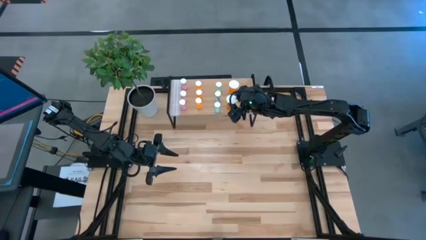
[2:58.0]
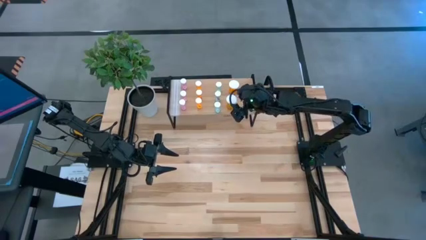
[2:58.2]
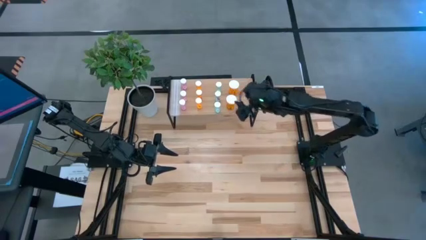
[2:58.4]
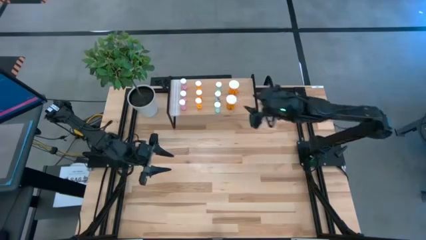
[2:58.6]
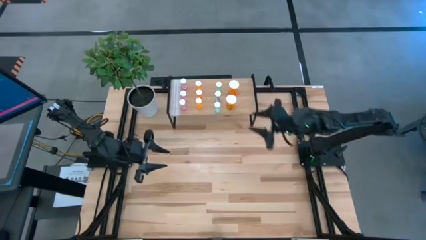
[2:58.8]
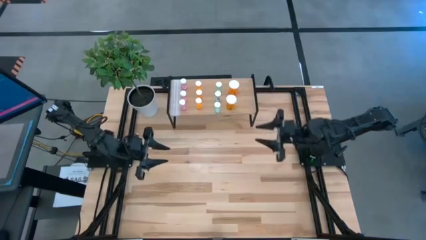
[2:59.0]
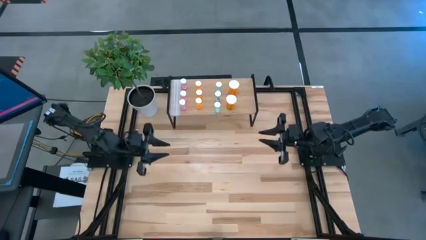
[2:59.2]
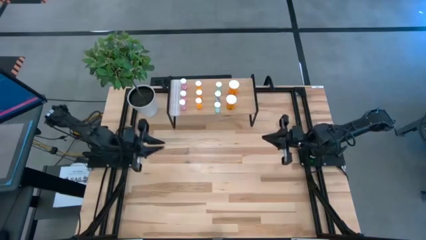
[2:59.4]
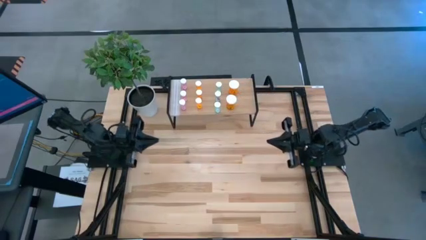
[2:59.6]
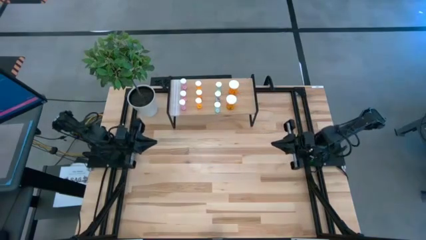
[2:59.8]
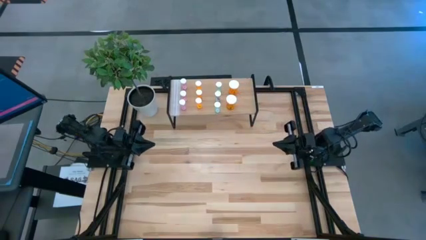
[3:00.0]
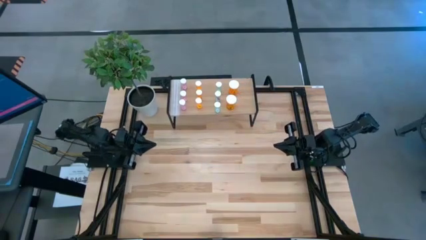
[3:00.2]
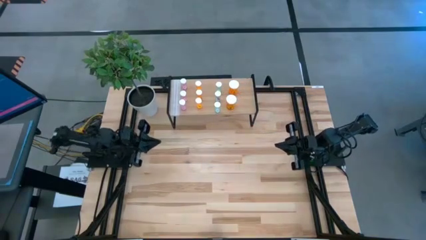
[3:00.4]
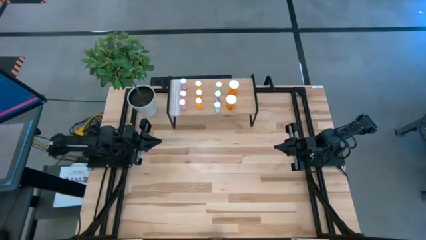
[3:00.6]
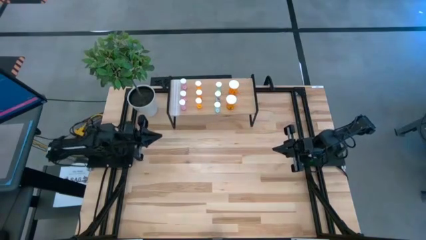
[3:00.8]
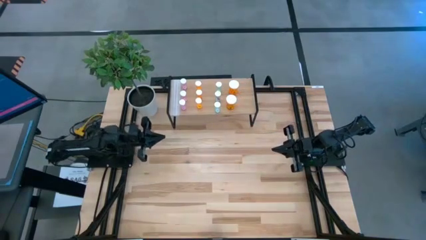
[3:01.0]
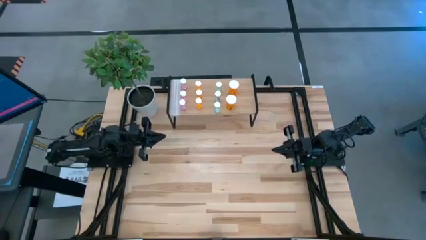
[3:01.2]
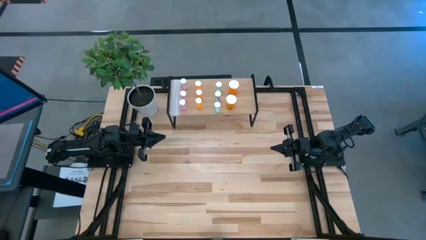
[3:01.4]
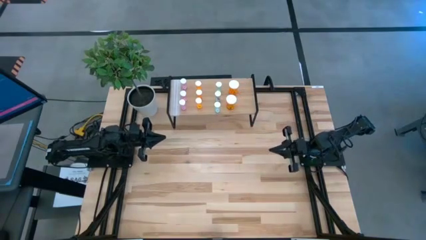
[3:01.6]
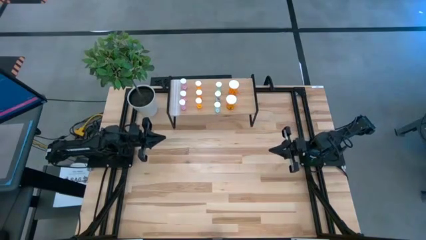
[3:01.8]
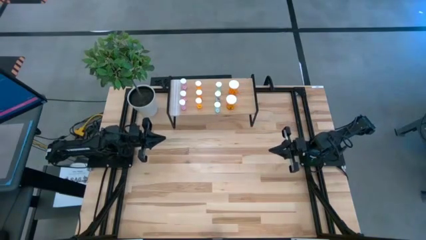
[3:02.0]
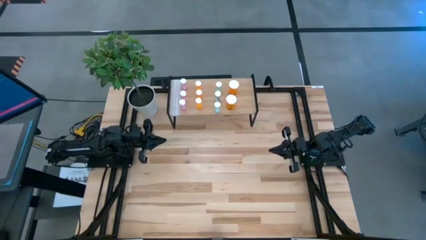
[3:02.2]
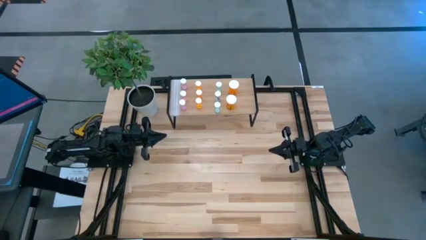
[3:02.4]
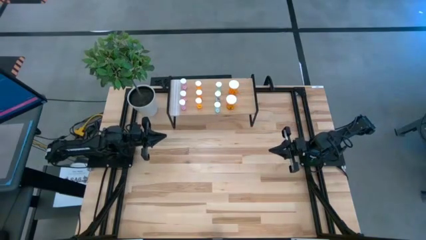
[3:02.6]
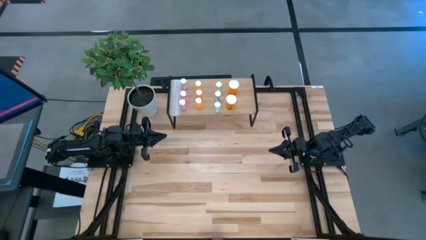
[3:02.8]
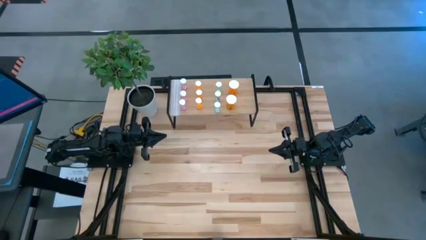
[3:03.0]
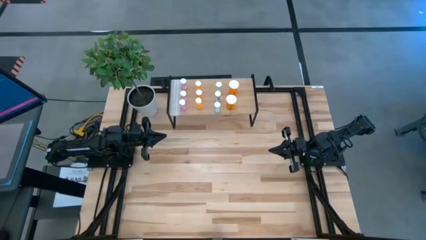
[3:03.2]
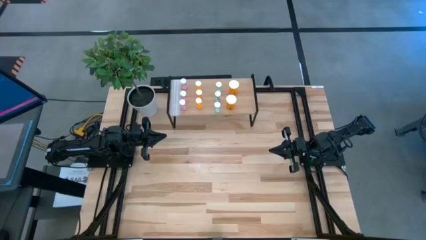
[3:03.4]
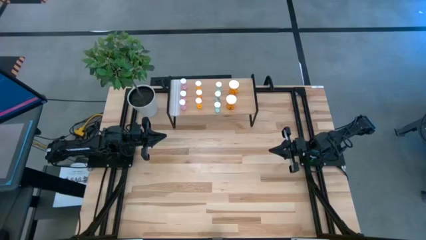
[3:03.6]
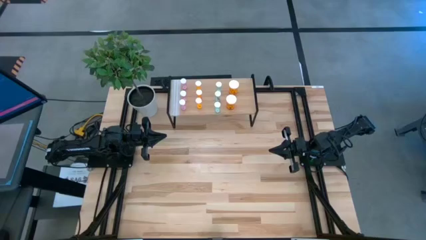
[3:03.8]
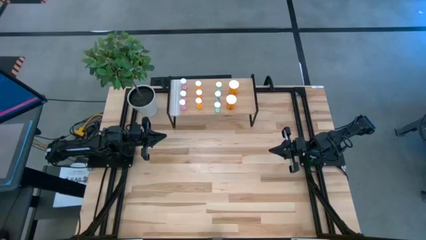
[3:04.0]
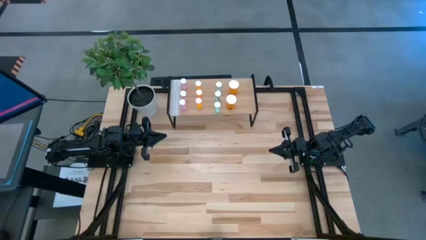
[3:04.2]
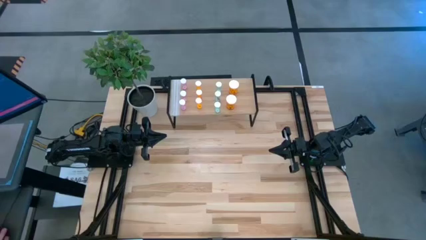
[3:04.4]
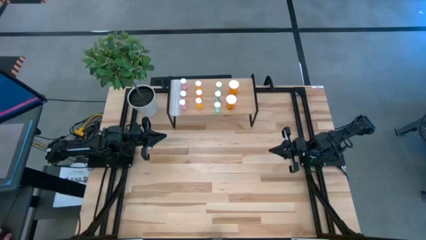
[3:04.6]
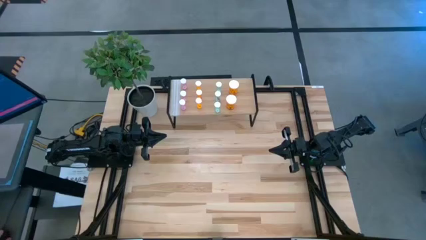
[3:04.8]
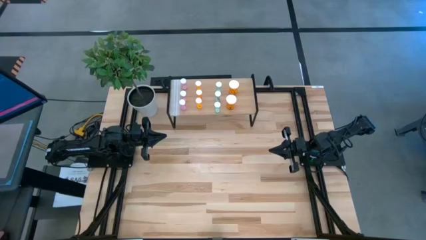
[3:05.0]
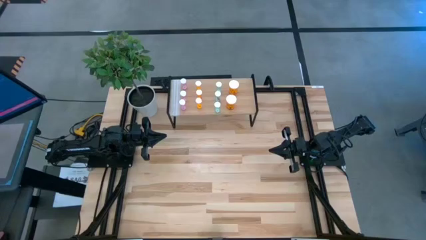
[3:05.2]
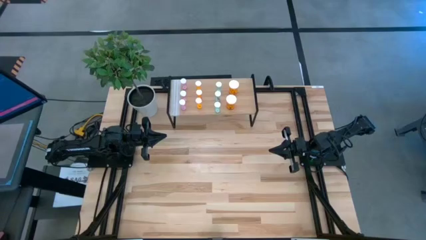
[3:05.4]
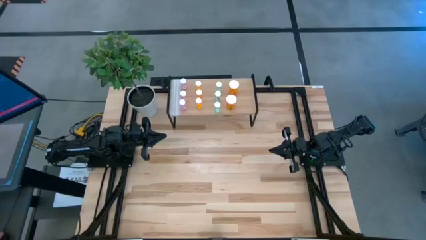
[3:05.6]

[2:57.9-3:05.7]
Task: Pick and place medicine bottles onto shelf by color
Return to Home Position

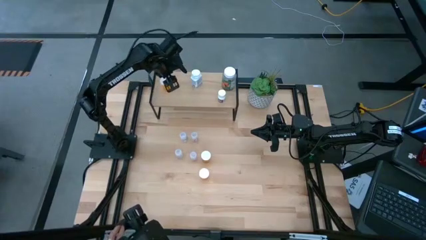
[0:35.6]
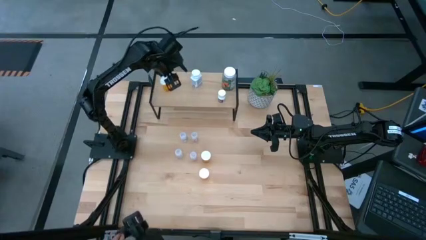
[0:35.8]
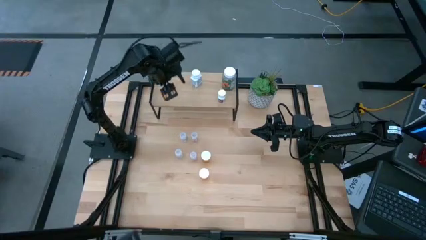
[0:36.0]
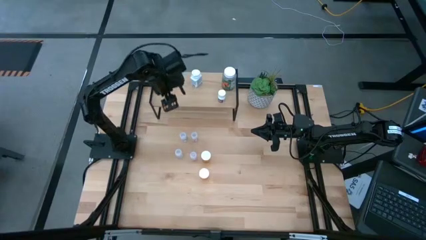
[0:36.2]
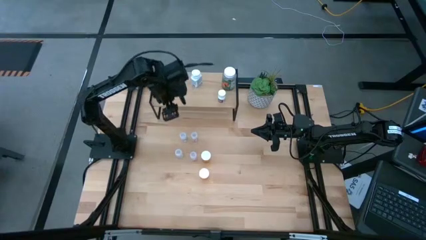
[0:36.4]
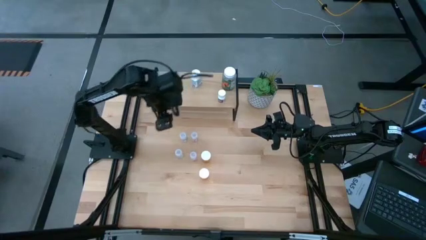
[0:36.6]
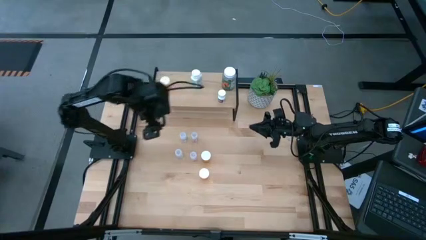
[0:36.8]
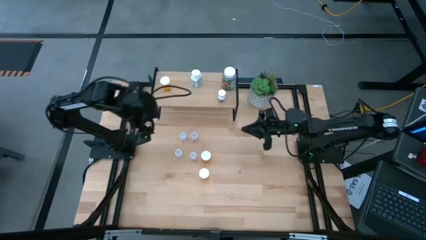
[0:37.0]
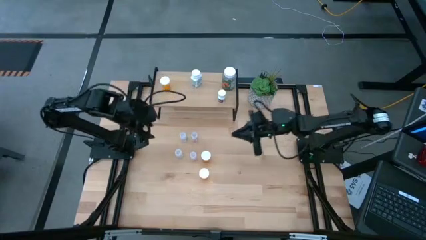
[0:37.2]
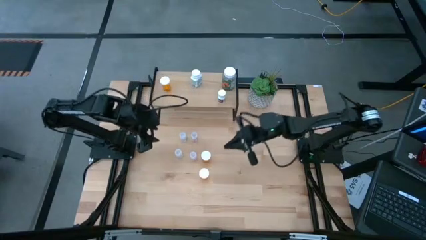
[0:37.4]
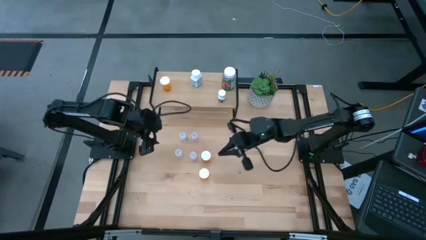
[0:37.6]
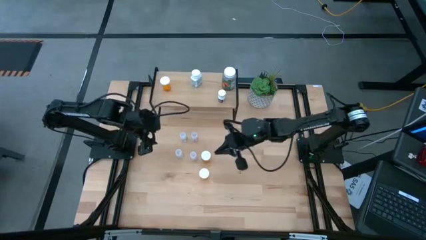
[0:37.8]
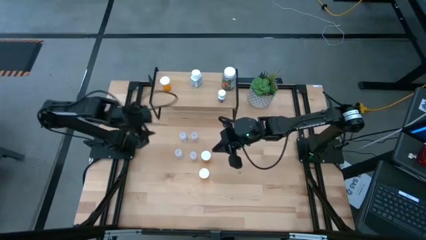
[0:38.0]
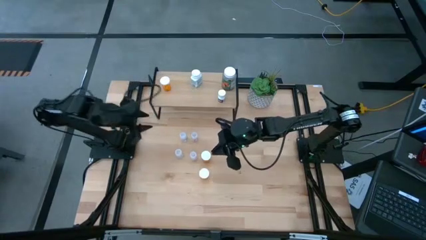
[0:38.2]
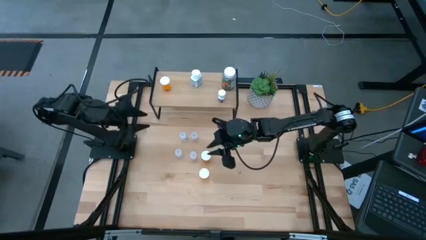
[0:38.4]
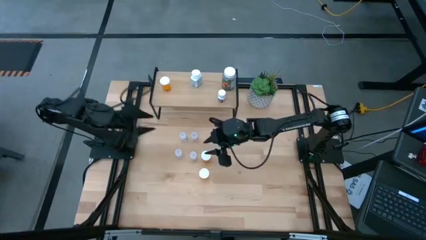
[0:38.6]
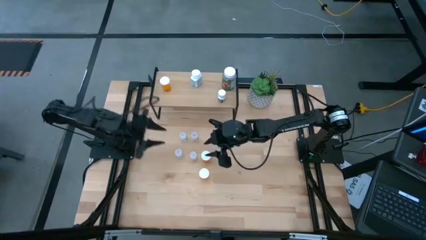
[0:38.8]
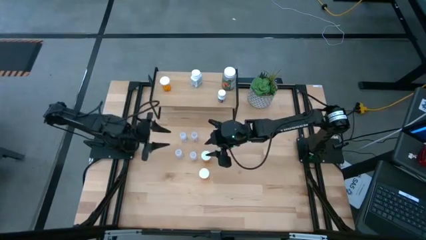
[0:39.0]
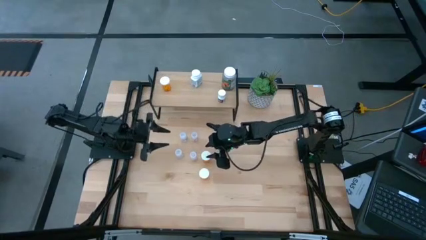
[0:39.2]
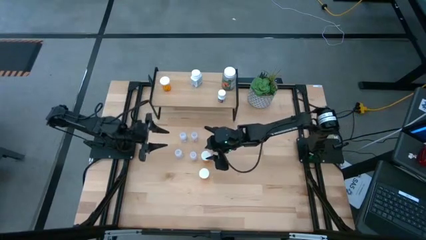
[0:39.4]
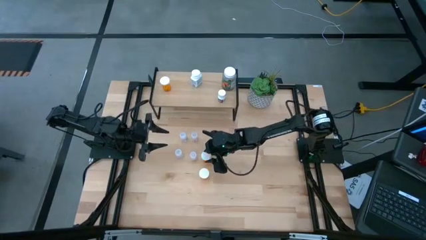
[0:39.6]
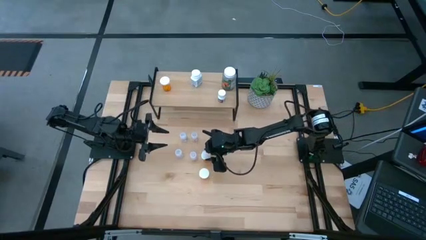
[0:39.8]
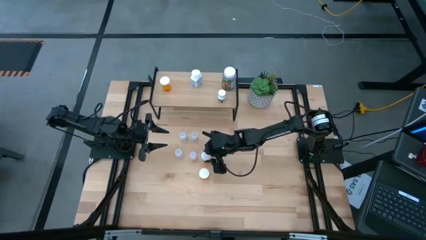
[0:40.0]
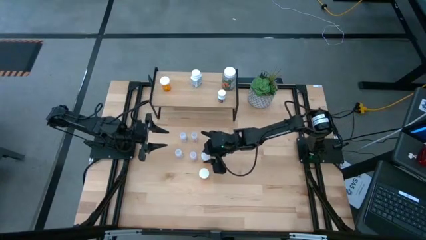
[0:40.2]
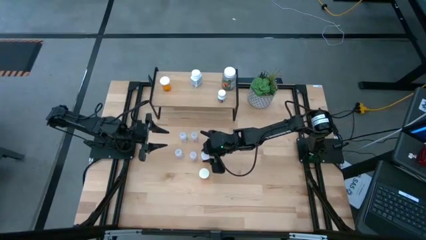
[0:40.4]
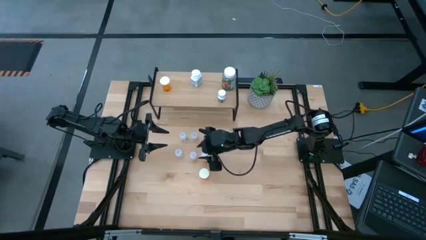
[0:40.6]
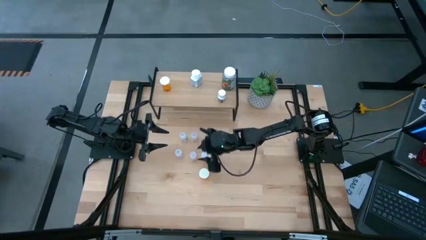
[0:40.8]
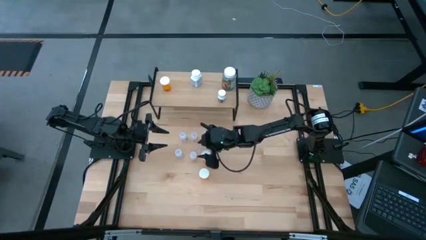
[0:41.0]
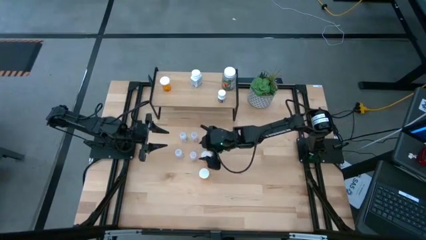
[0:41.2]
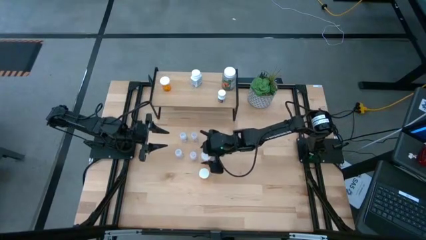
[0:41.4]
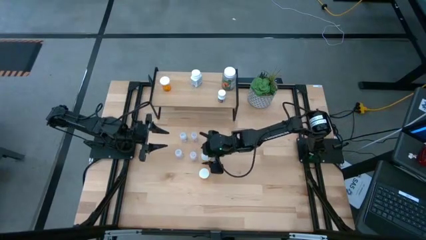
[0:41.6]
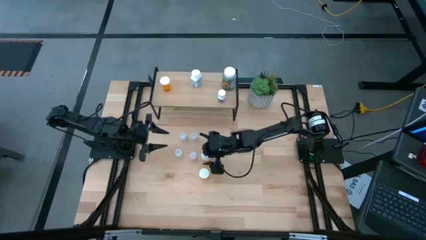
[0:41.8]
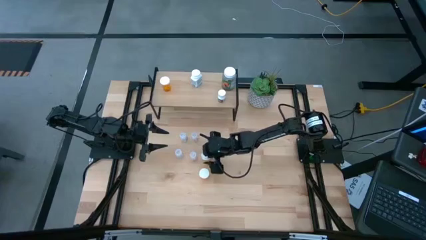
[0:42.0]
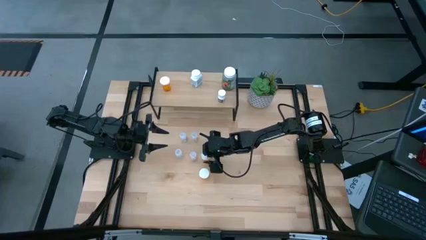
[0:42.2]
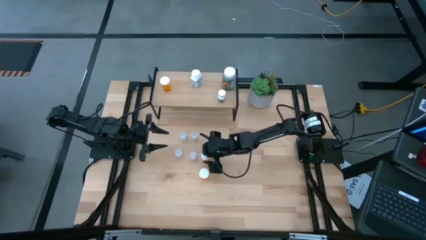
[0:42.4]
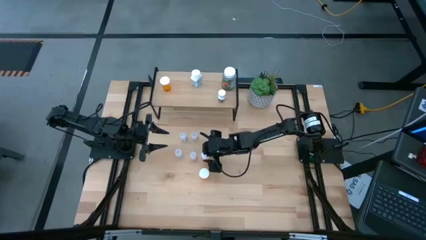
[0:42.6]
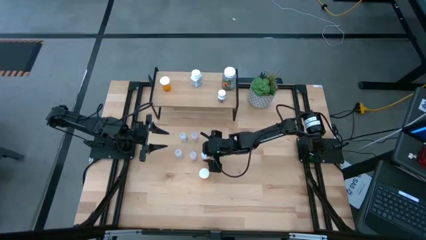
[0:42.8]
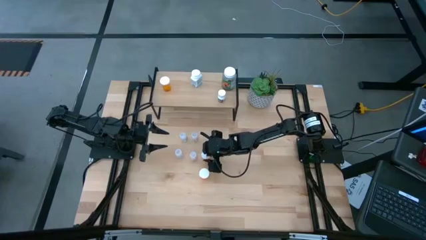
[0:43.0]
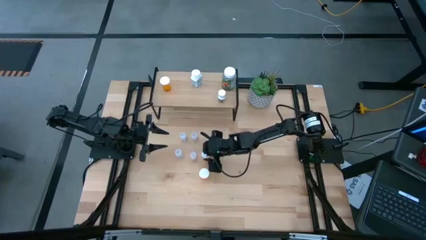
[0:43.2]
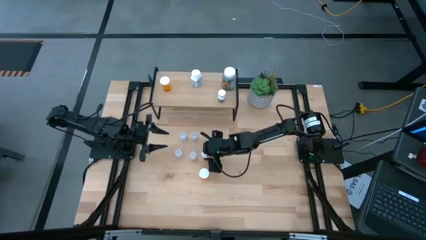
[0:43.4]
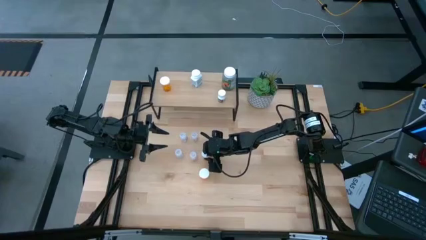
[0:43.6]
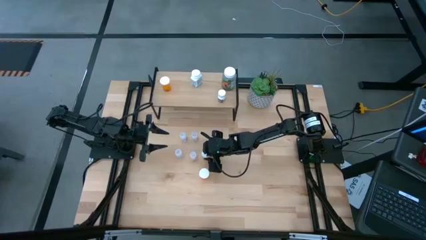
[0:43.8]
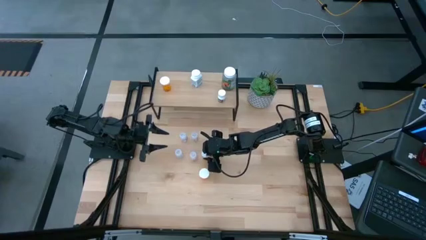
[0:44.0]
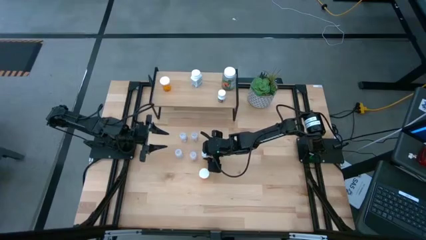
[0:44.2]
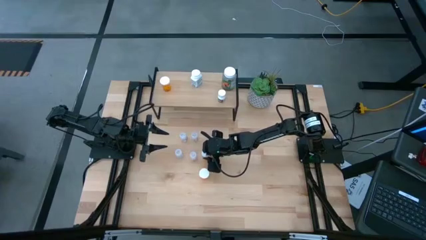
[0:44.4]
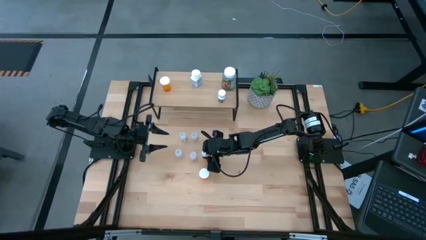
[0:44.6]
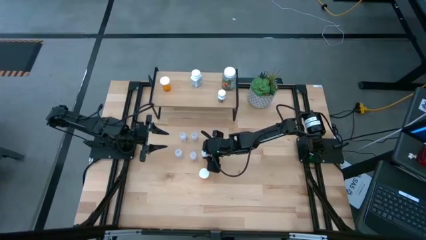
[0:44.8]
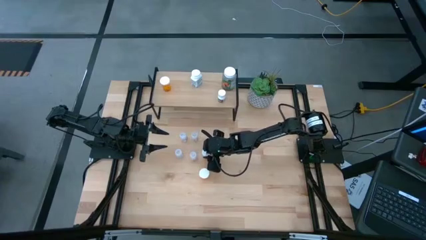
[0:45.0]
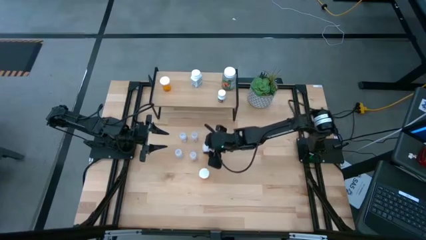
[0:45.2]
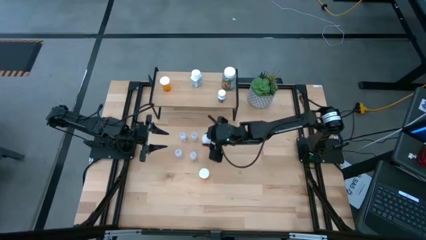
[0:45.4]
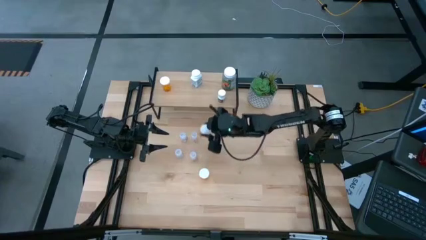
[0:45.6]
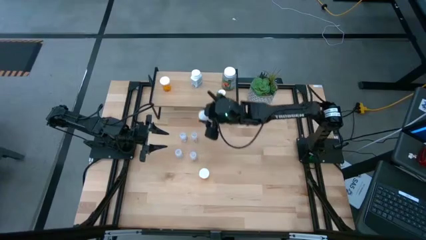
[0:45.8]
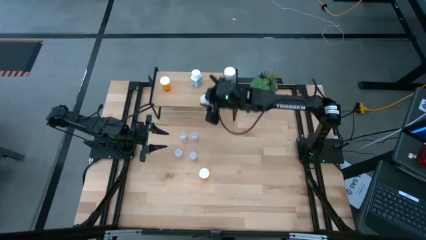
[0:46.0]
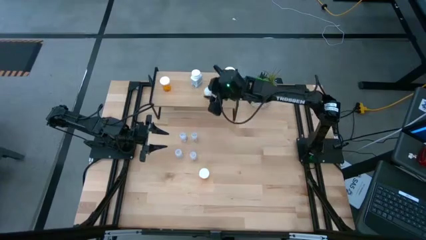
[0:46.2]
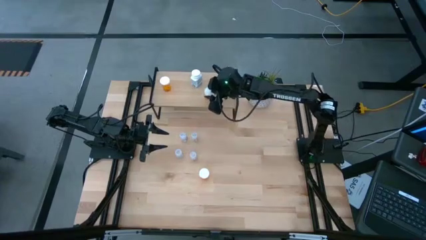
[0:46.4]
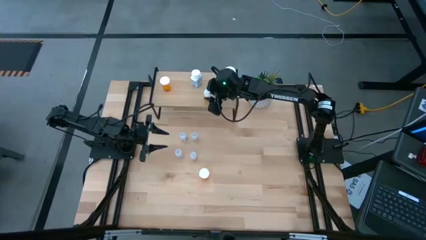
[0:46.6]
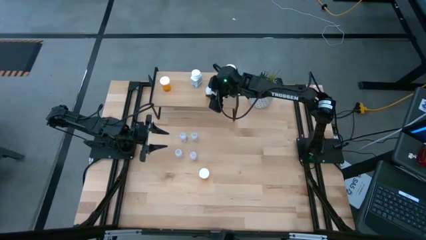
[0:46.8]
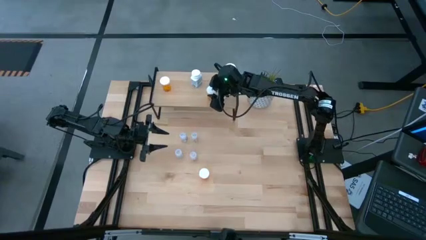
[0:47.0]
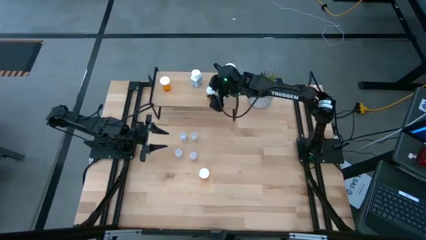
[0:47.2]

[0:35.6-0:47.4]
Task: Pick and place medicine bottles onto shelf by color
Put the orange pill bottle on the shelf
